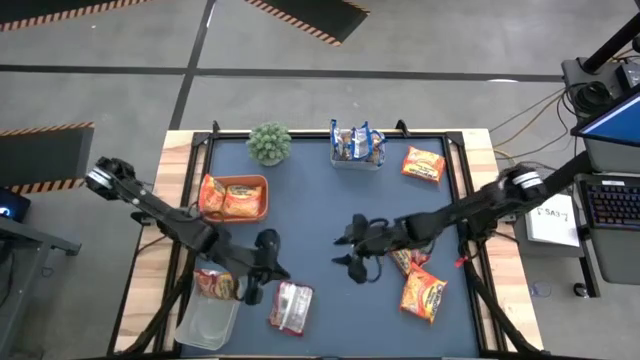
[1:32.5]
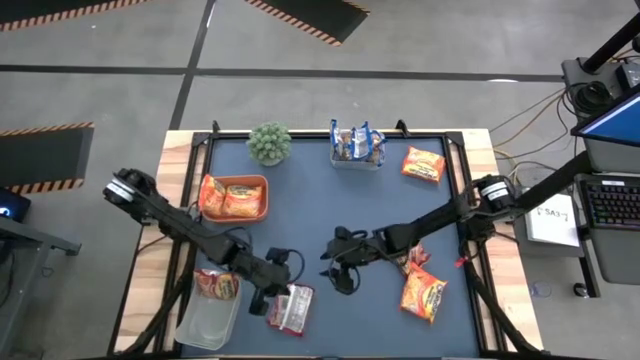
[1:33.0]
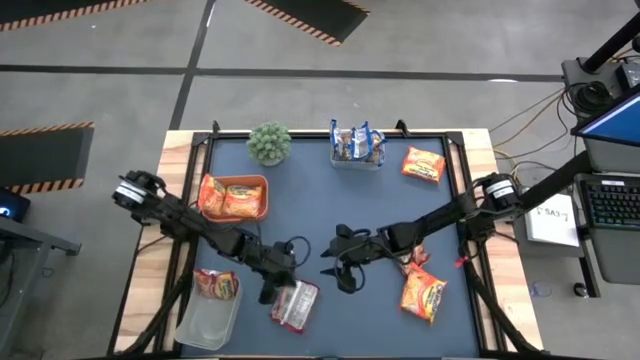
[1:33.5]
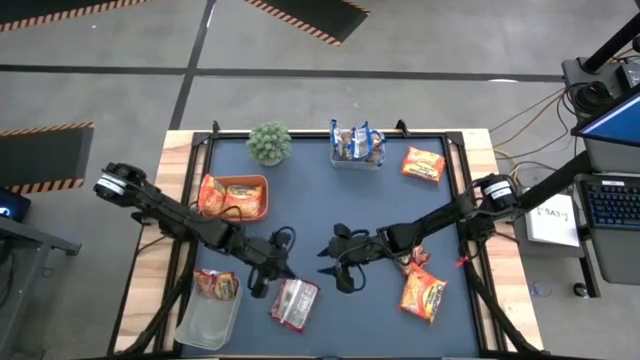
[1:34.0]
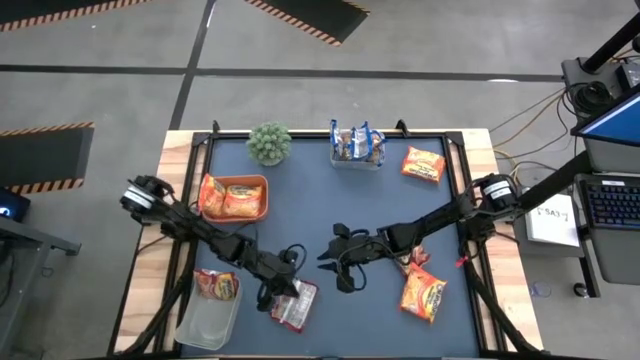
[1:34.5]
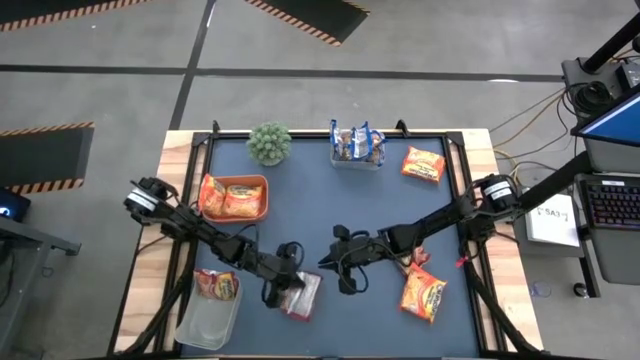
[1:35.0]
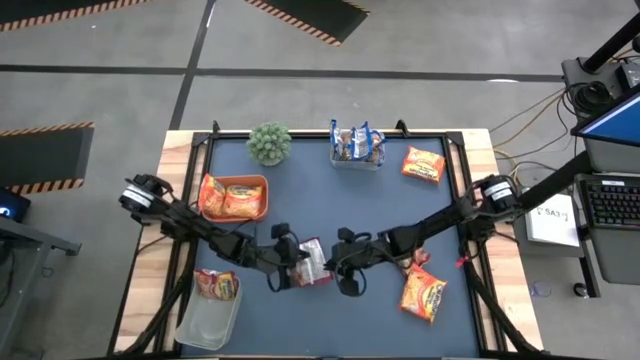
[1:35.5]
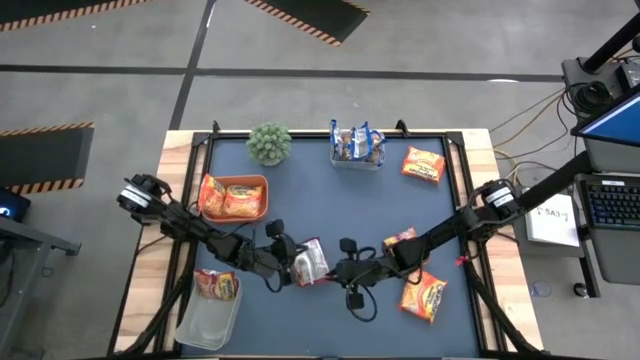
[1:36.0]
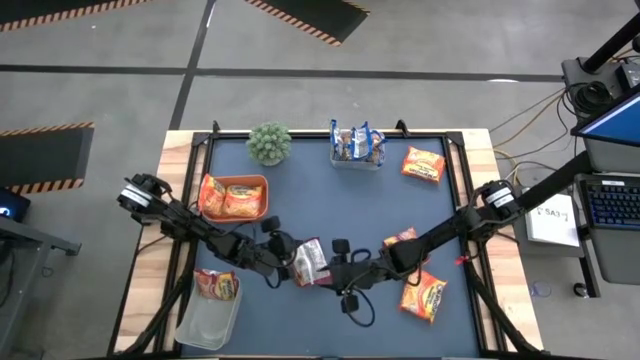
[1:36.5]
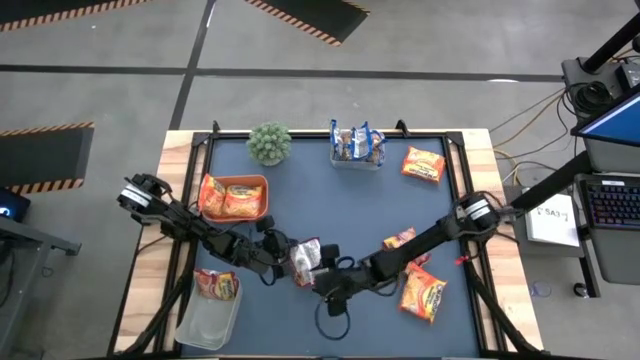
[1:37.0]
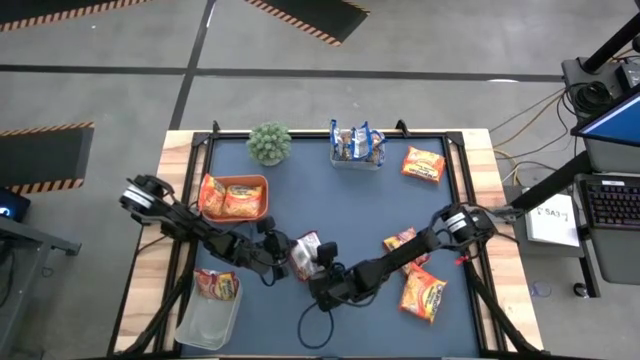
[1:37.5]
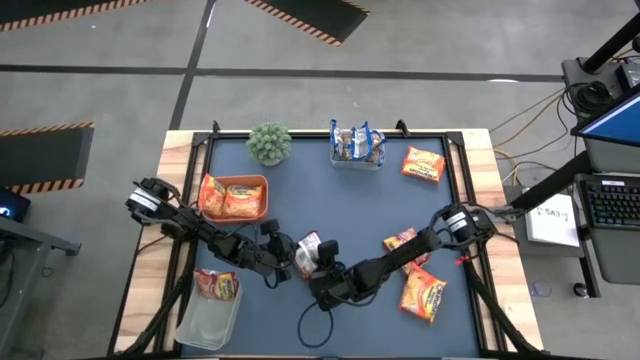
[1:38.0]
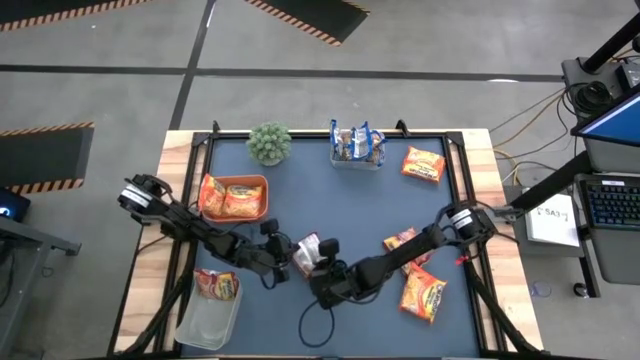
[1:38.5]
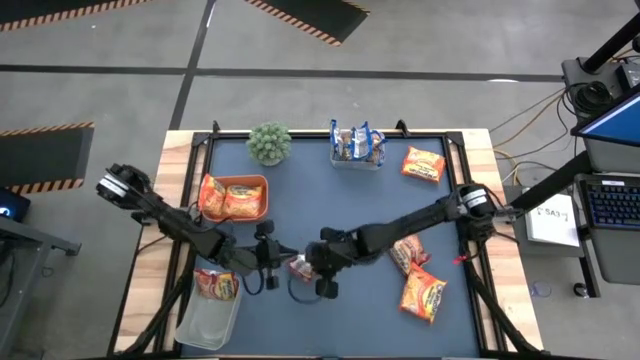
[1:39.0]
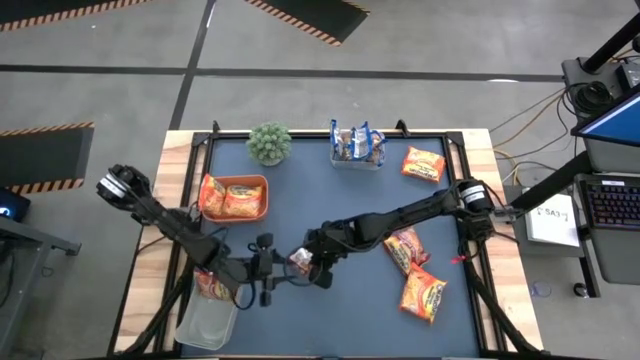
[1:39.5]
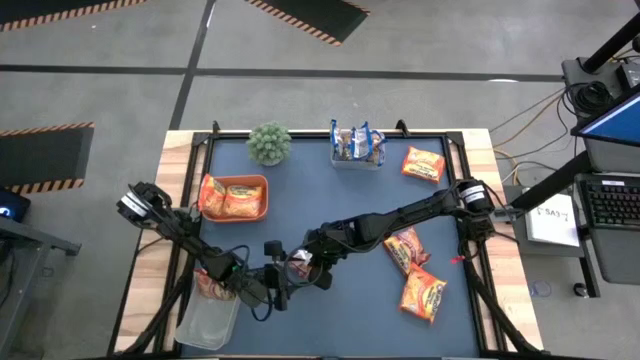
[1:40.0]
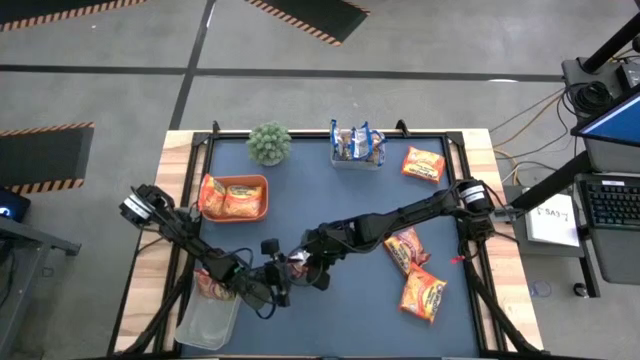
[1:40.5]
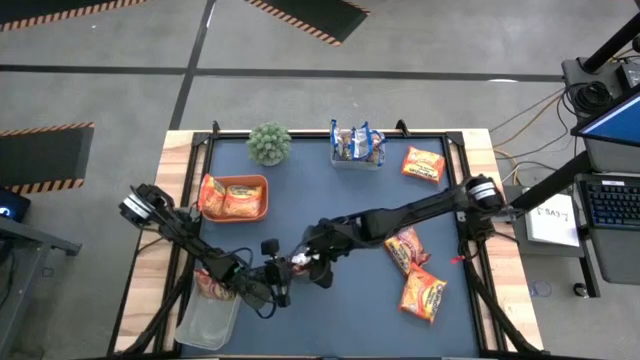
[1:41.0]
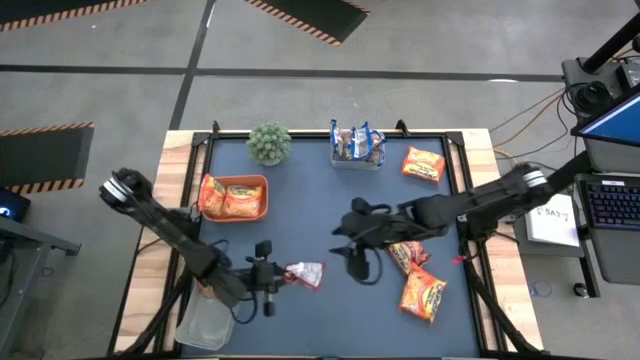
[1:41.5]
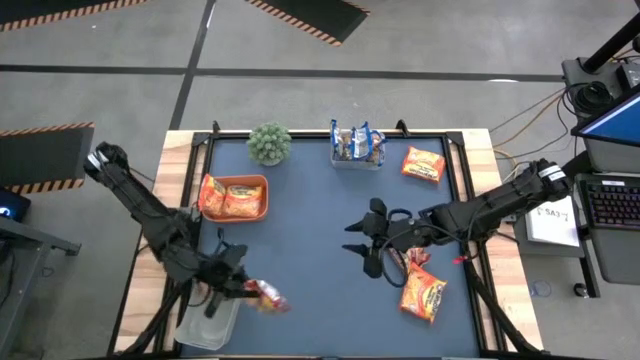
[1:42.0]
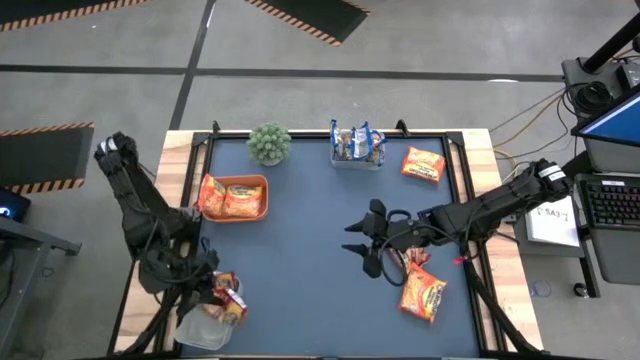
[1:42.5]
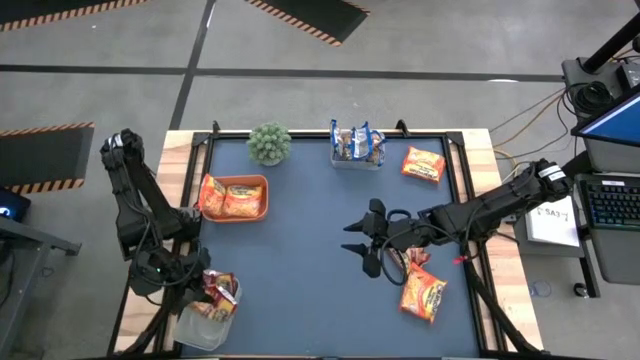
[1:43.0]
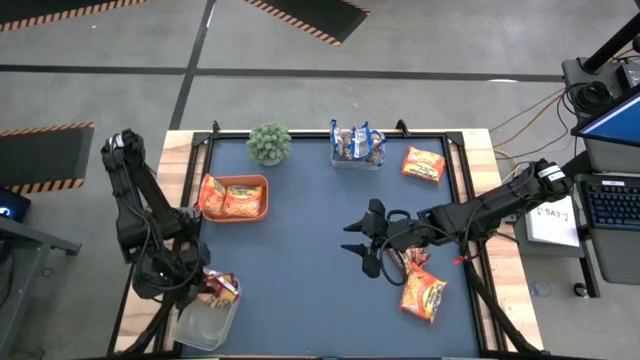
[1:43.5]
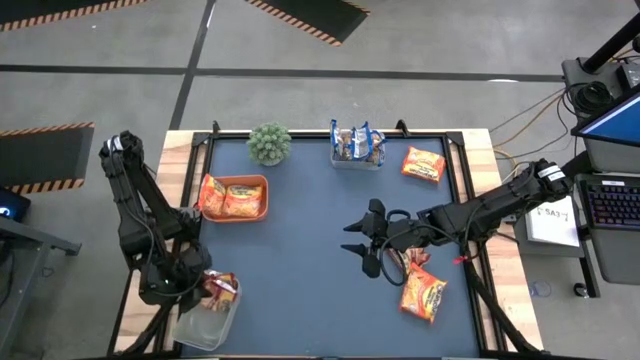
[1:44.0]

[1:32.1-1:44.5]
Task: Sort Maruchan noodles
Put the red noodle pack into the gray bin

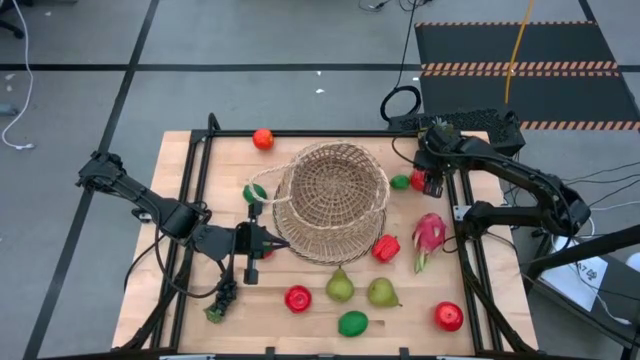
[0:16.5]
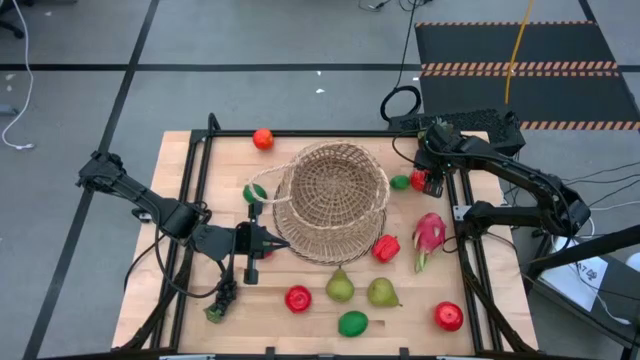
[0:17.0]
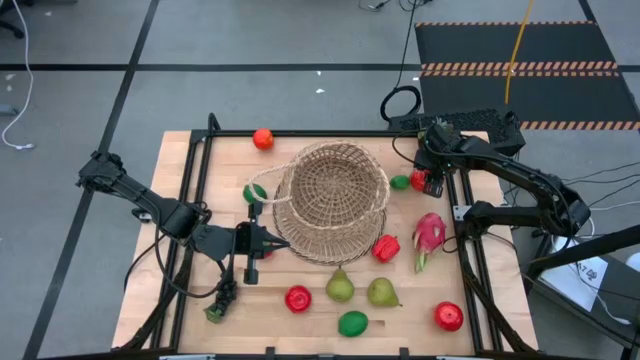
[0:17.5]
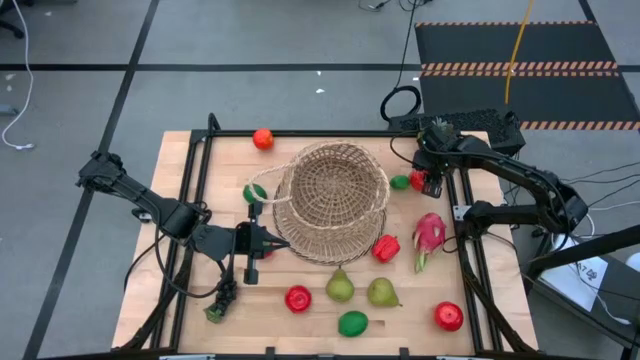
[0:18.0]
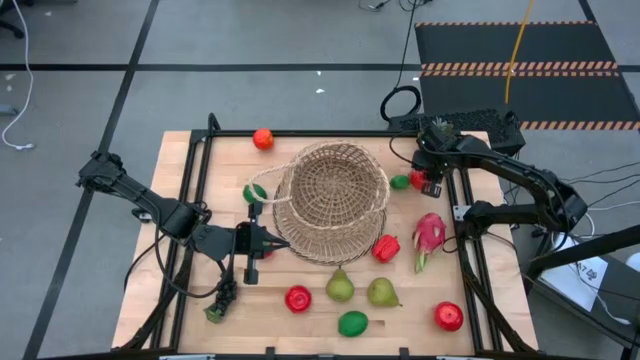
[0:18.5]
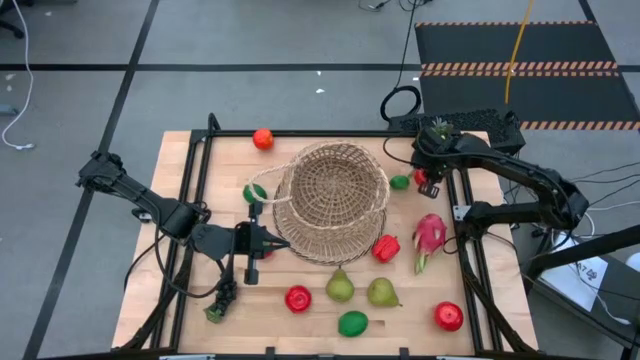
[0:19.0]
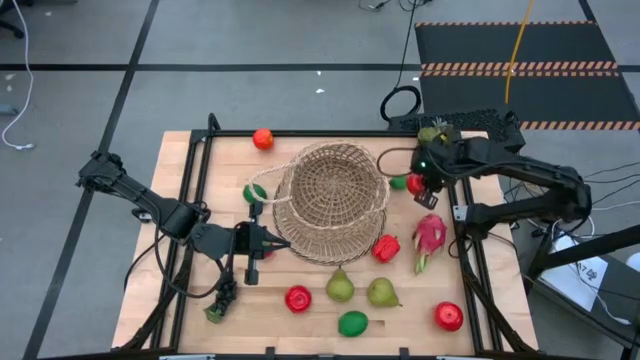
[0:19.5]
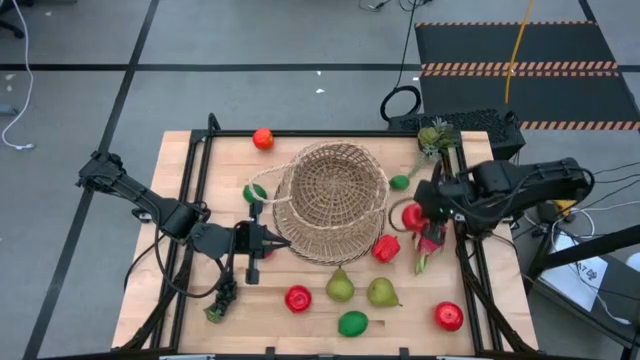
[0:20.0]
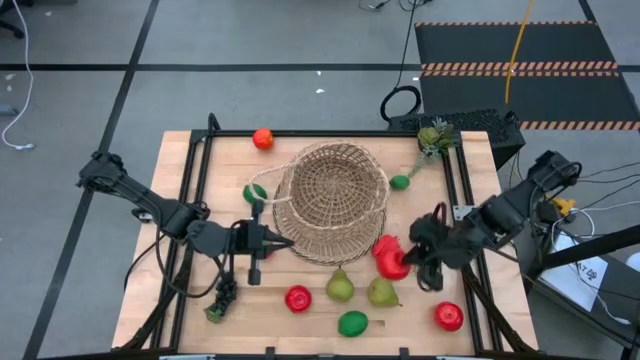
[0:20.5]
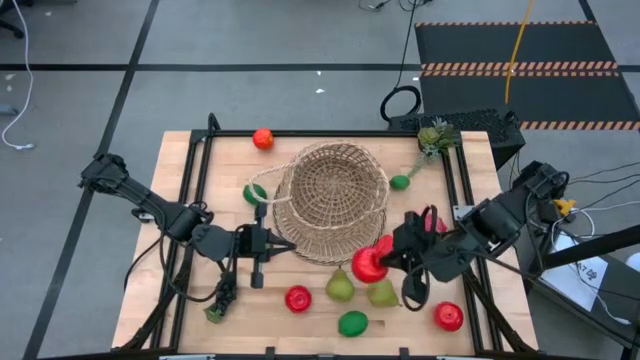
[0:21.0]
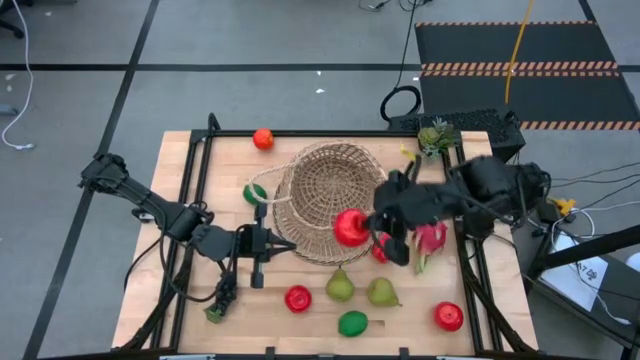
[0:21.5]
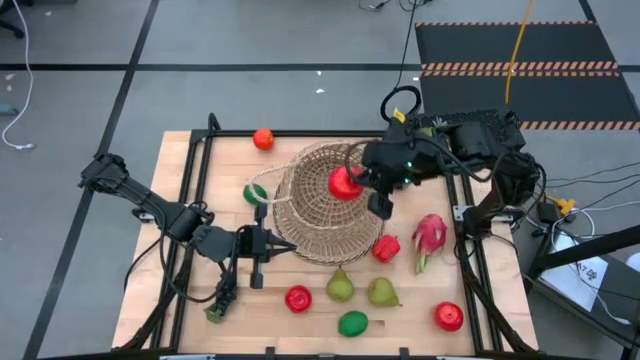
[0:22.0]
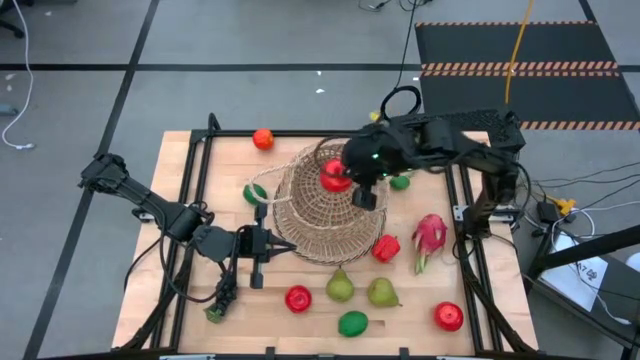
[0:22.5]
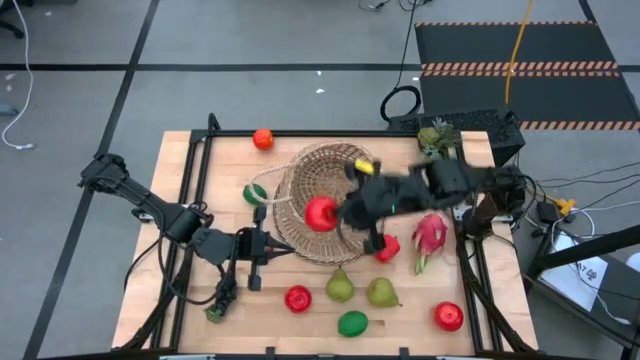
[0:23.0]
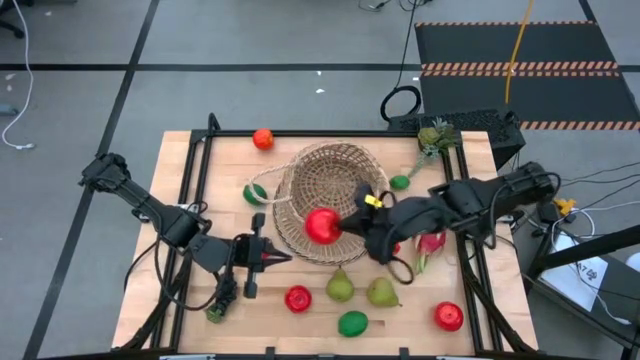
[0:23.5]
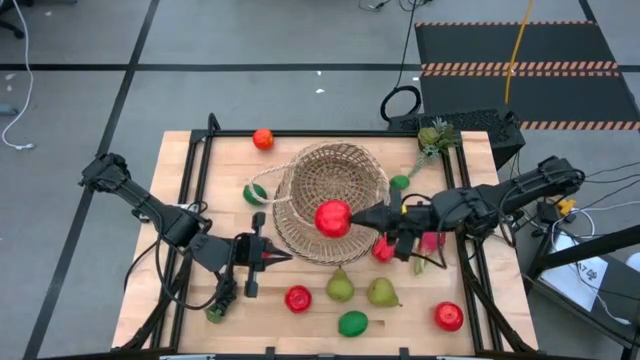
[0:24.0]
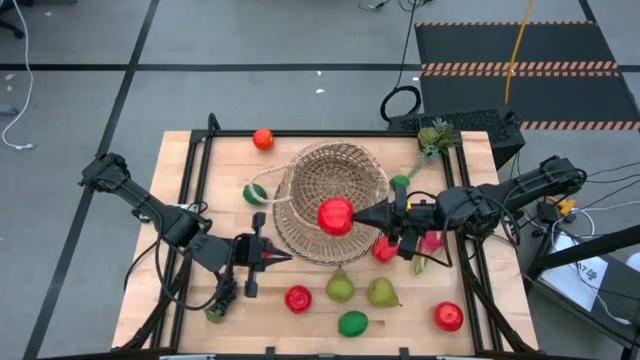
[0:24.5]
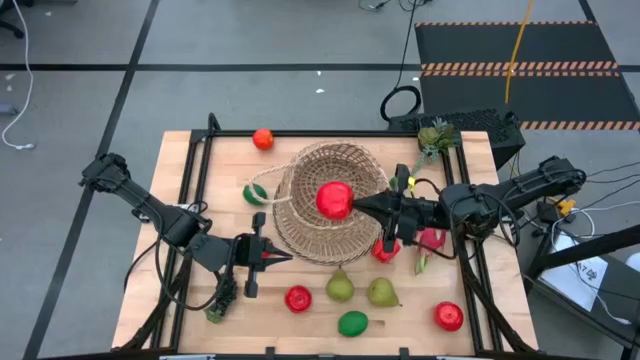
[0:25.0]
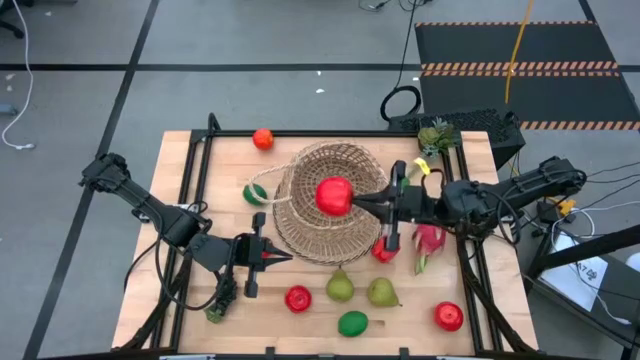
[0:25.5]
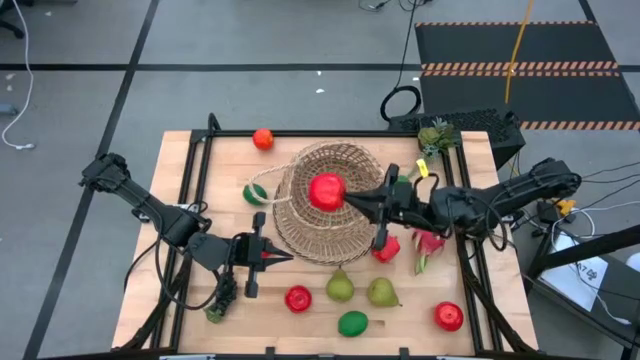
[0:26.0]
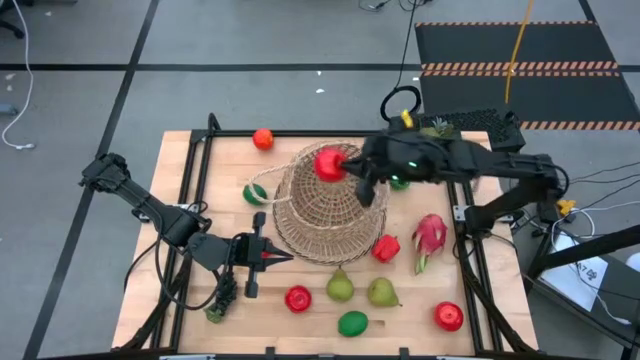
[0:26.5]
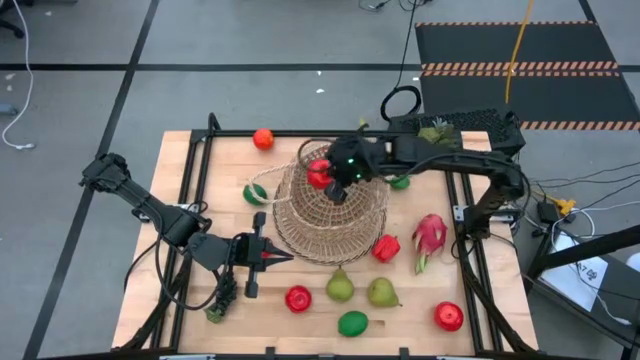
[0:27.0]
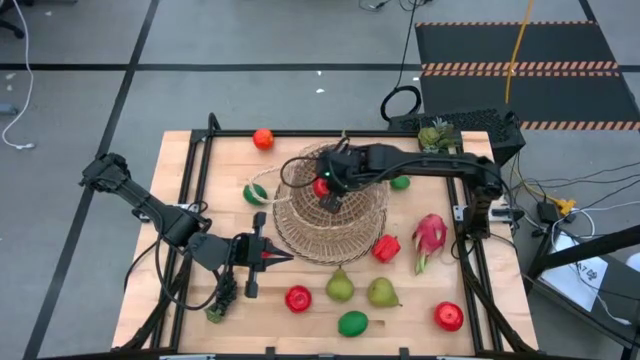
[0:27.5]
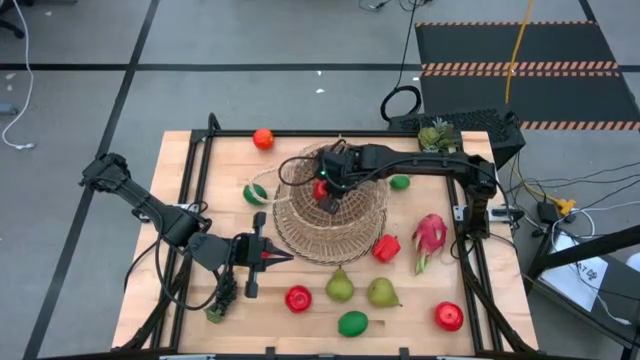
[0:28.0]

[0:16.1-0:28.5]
Task: Build produce basket
Put the top right red apple into the basket
